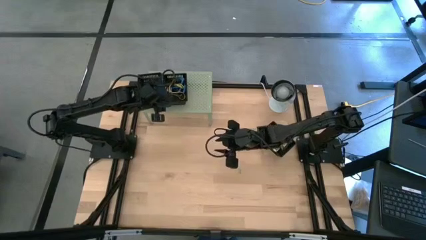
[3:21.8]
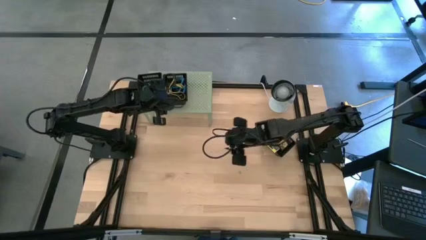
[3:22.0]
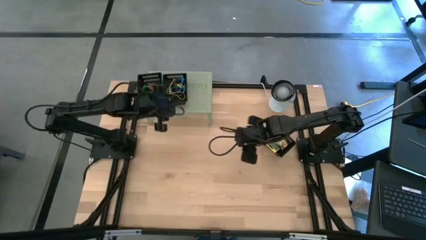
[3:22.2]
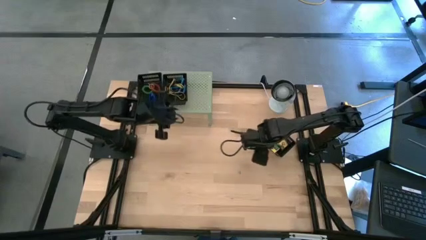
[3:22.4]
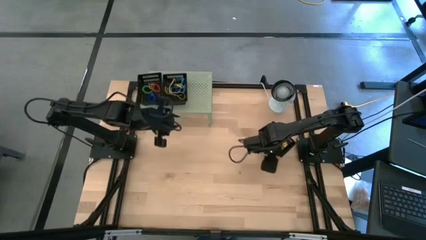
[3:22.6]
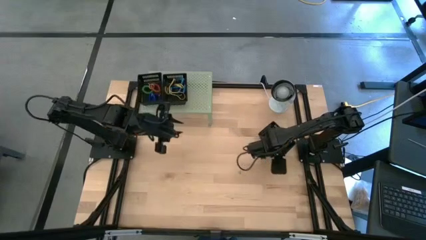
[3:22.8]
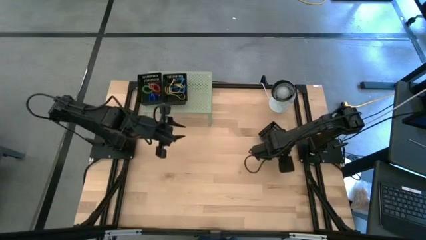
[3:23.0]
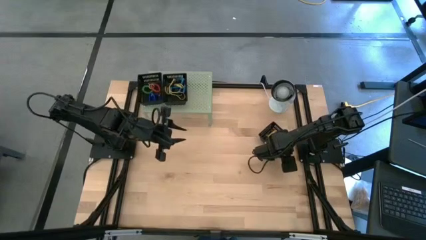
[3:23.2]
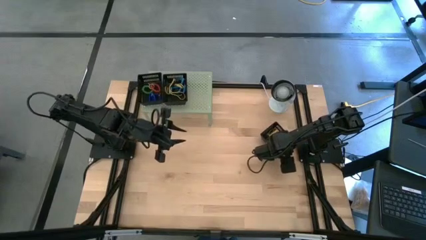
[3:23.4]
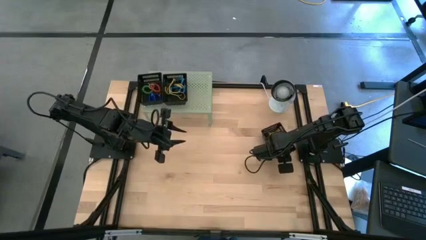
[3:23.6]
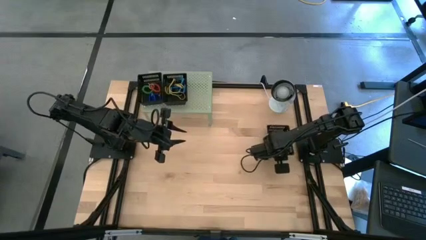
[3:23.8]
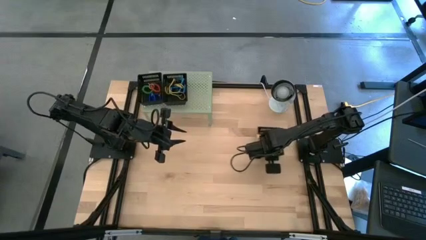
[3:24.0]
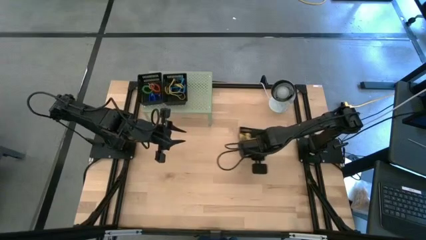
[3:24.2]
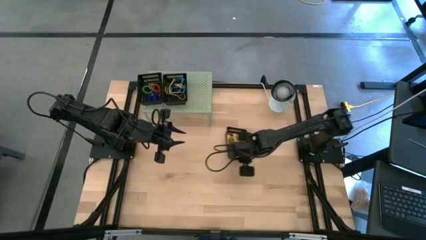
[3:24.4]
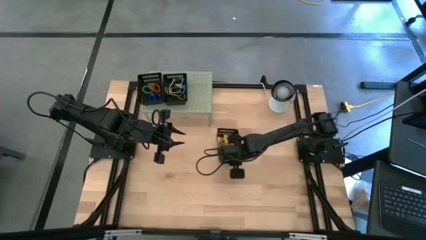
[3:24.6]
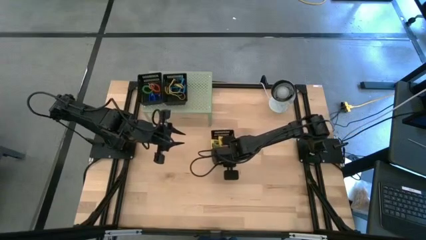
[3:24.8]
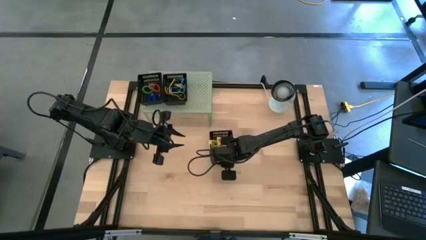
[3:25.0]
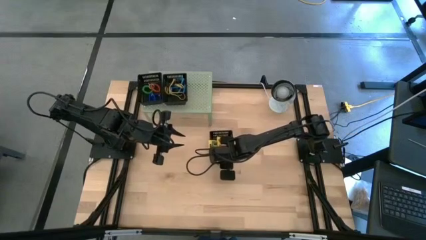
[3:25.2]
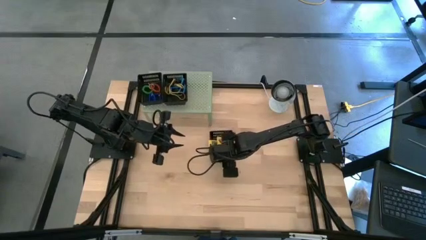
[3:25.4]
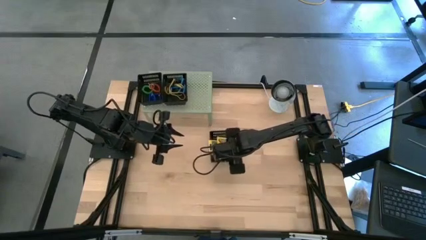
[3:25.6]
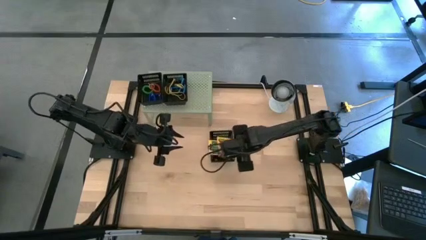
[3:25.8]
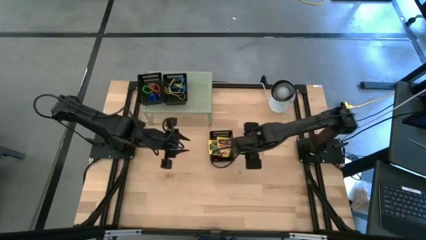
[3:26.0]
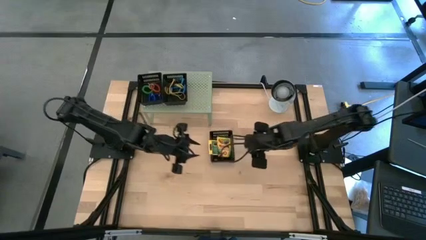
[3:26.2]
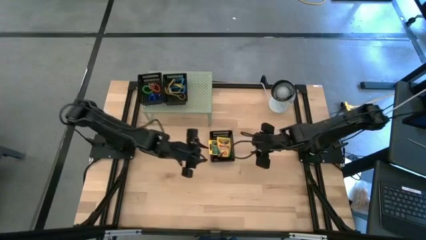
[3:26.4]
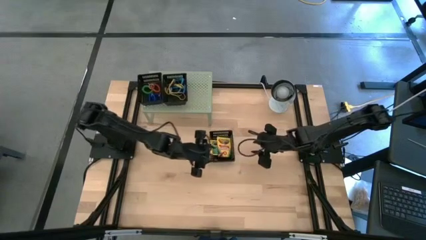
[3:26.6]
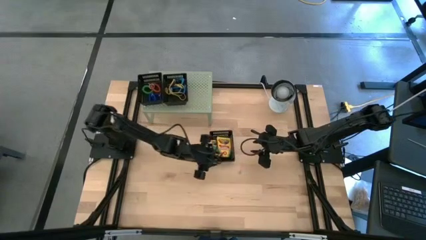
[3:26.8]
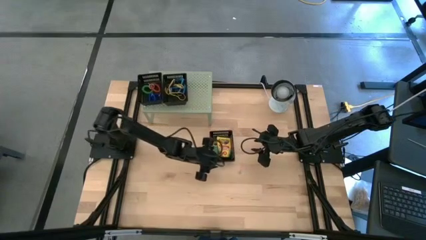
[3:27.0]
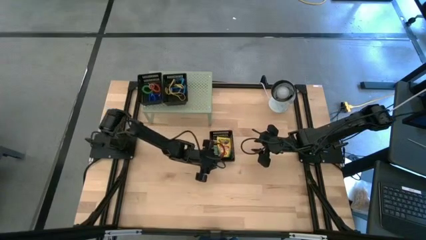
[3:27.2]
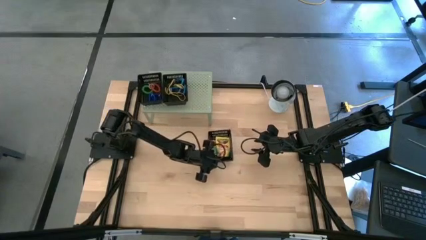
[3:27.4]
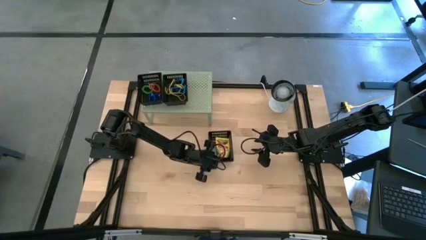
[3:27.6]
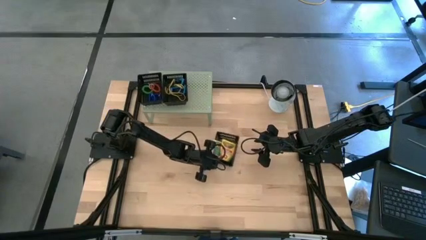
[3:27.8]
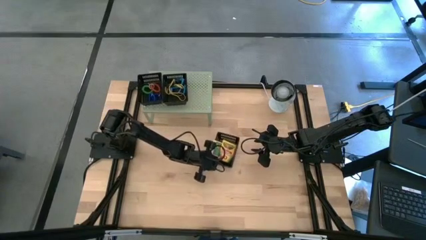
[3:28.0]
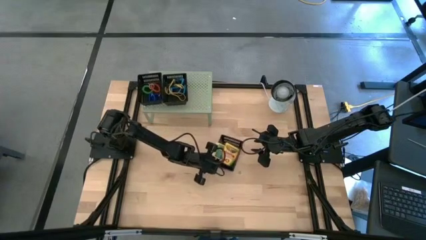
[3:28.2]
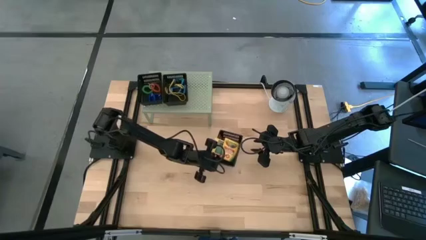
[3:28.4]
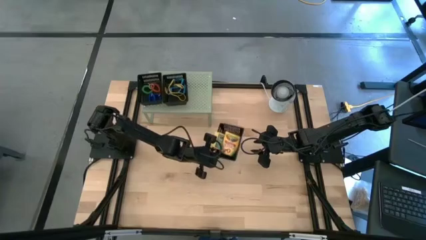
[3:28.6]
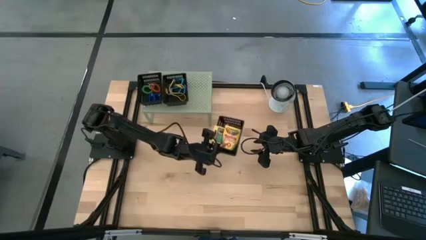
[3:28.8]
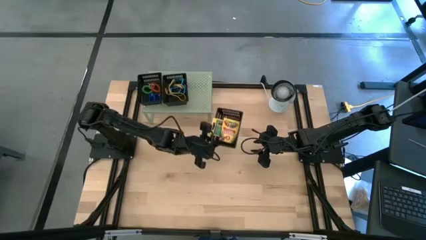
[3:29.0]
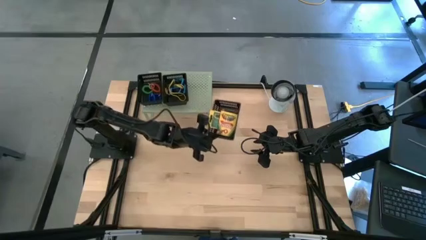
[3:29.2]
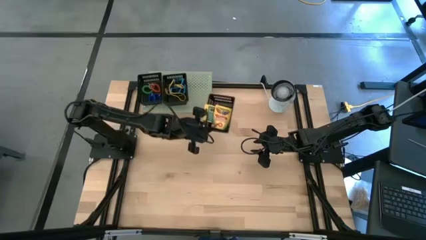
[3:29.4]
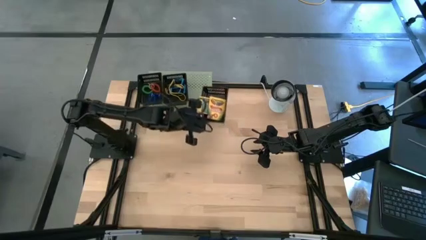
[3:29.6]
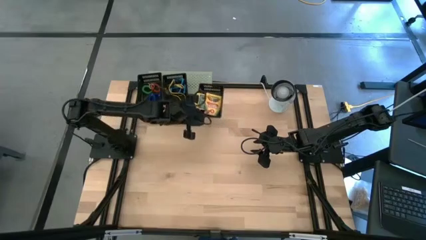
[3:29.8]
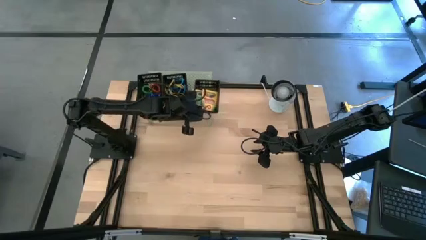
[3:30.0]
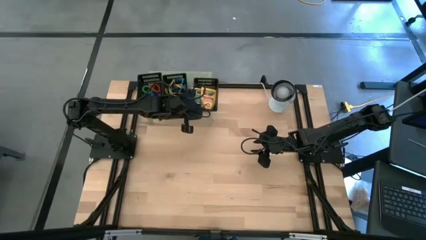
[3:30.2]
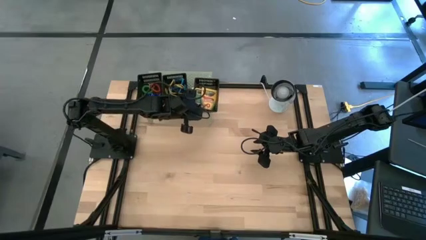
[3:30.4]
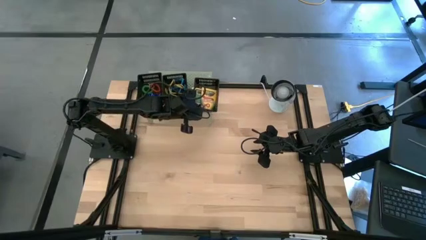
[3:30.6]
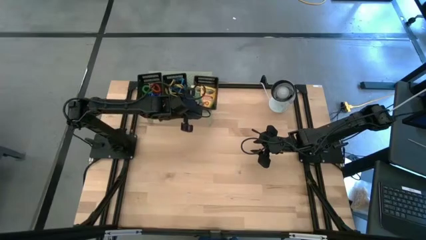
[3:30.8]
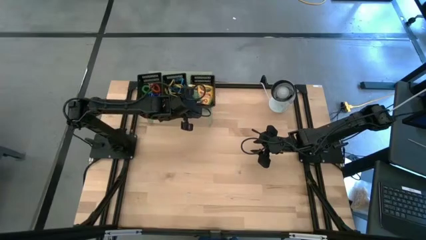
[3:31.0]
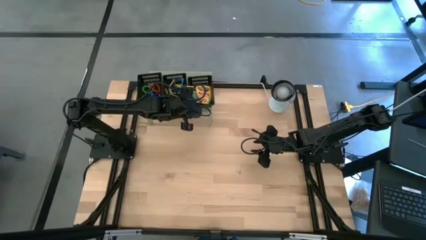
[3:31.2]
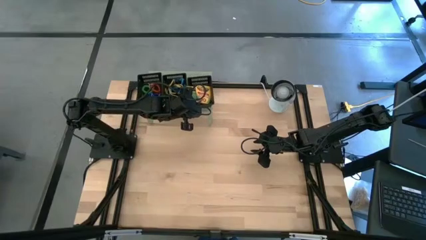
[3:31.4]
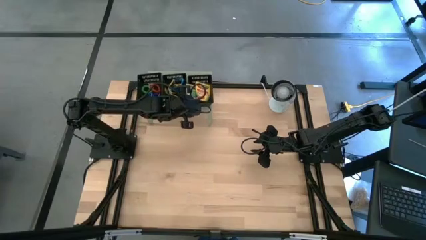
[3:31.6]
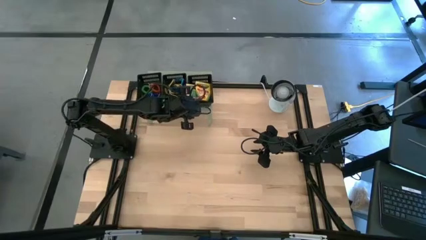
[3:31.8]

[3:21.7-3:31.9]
Task: Pick & Place Office Desk Supplies
Put the black bin on the shelf

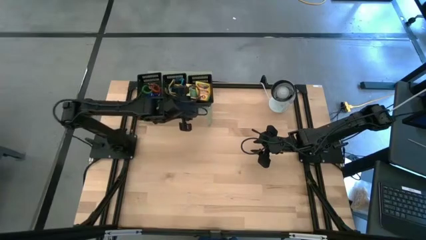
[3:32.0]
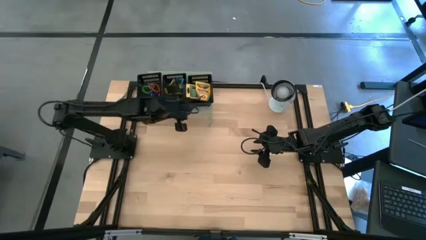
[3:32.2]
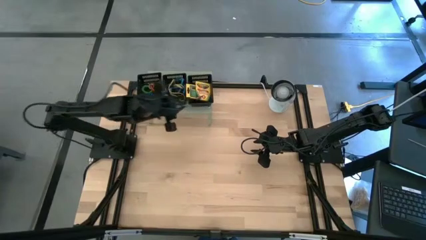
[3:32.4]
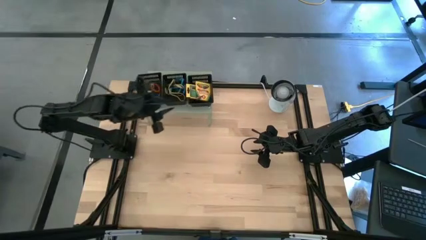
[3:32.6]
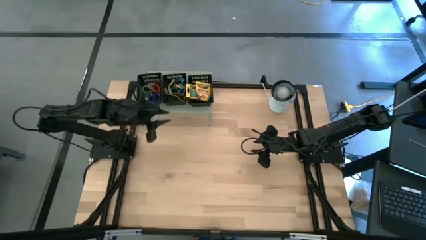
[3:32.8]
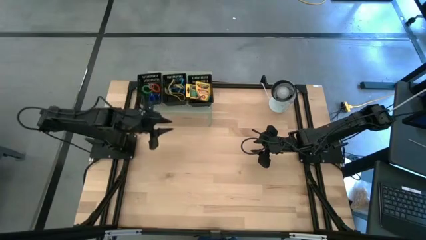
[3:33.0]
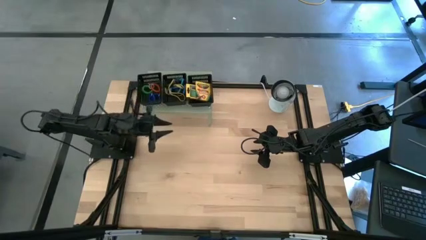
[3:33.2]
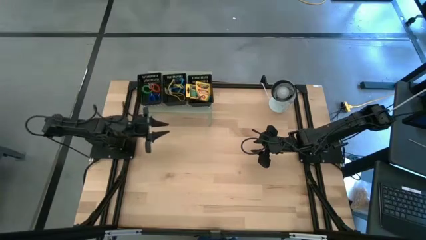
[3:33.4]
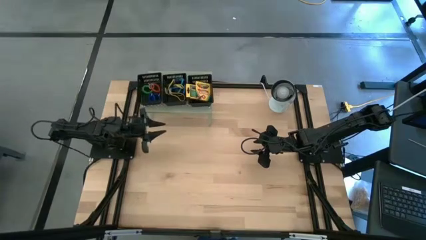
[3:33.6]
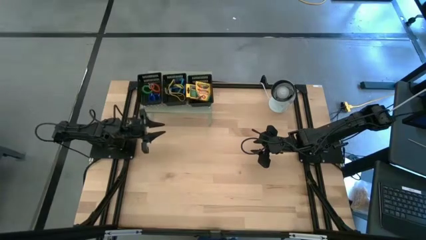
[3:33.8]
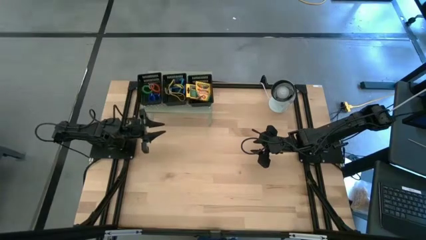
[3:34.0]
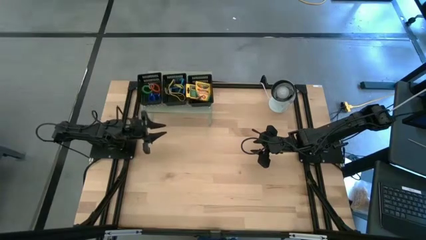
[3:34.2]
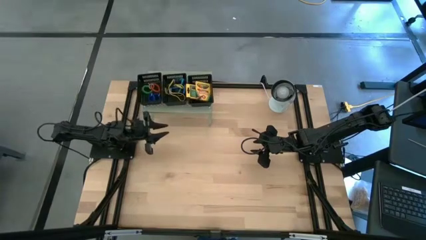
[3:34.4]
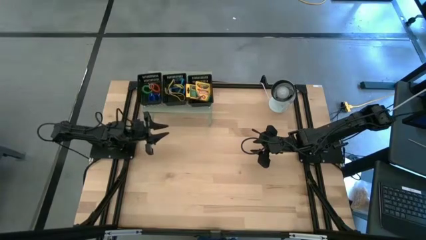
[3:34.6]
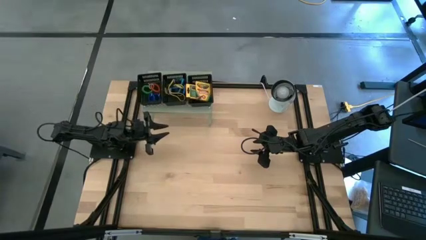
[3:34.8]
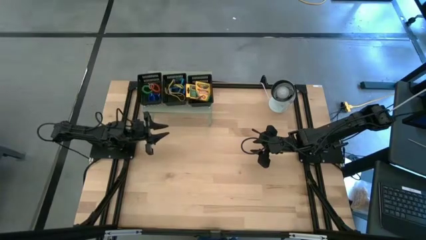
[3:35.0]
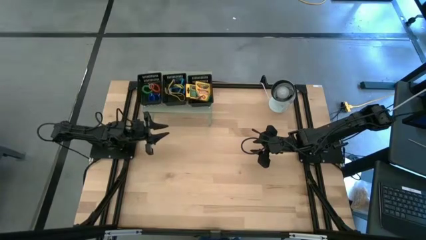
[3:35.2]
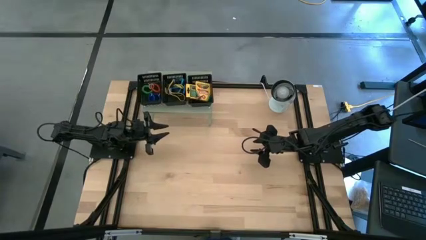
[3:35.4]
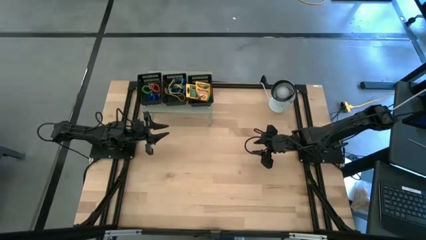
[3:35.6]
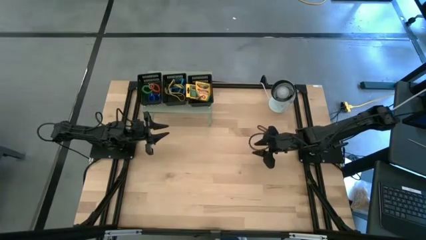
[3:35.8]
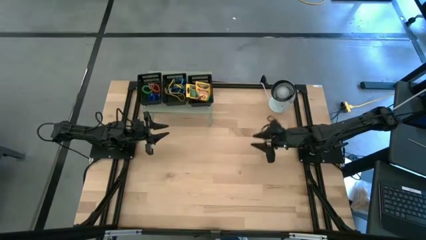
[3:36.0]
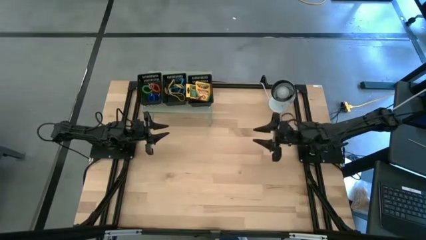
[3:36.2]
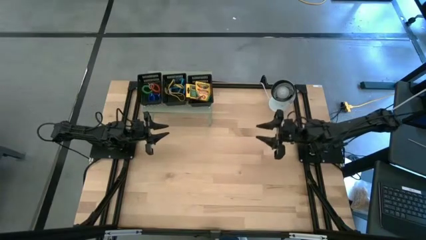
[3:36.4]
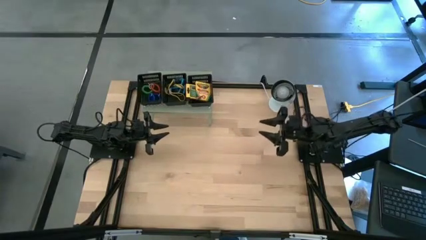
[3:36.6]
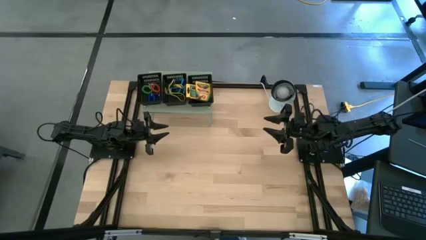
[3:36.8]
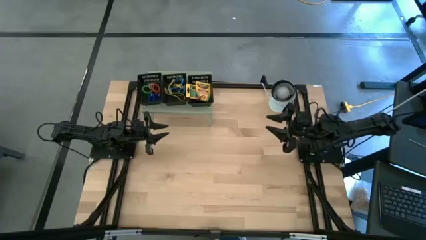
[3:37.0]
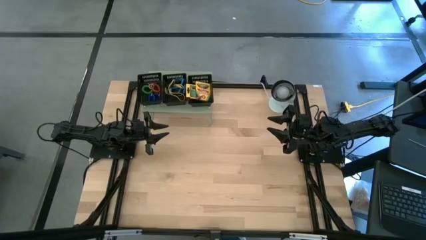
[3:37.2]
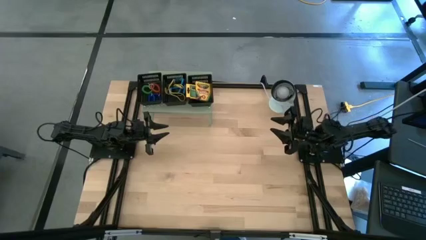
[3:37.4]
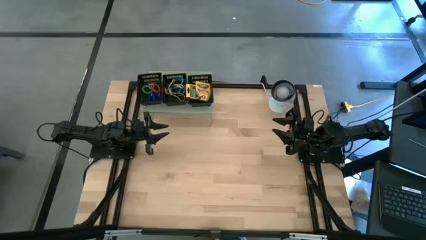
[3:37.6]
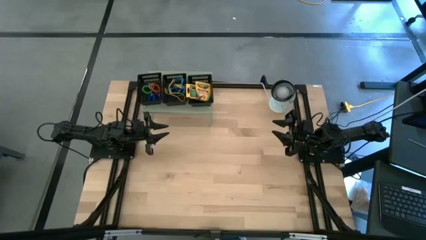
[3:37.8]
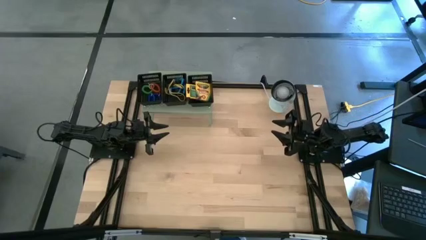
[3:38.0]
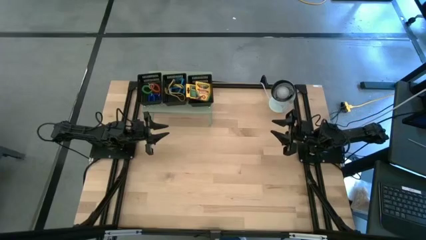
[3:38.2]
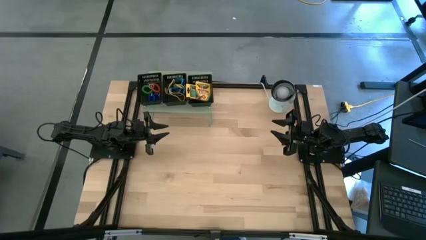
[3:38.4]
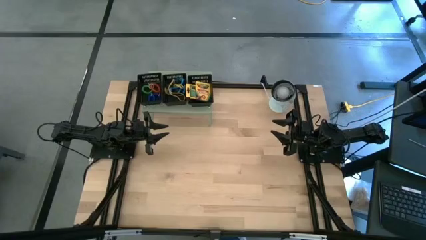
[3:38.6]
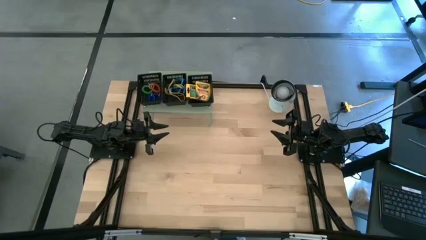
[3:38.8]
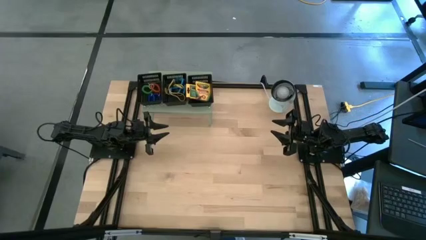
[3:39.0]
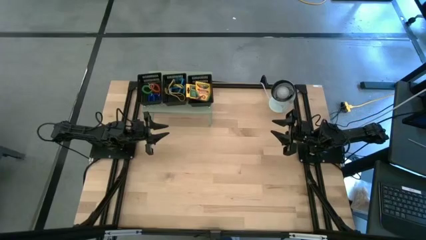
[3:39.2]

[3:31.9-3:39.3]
Return to Home Position
